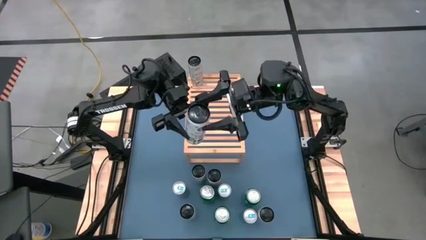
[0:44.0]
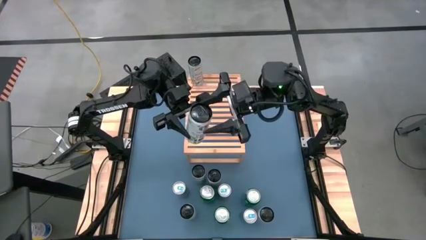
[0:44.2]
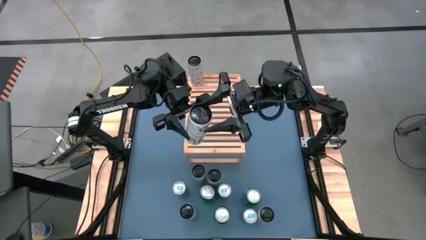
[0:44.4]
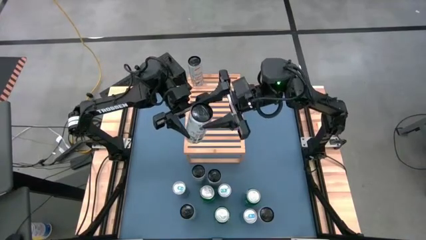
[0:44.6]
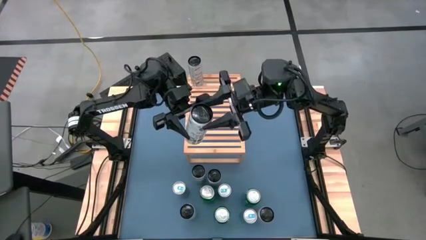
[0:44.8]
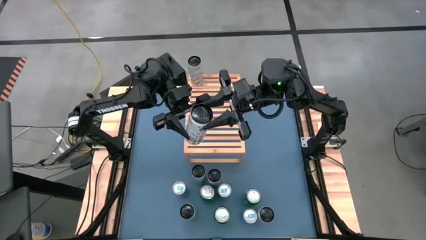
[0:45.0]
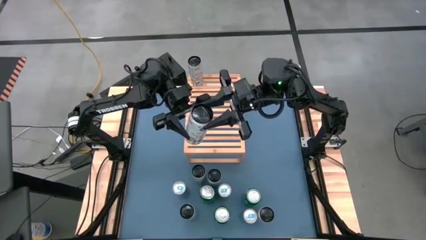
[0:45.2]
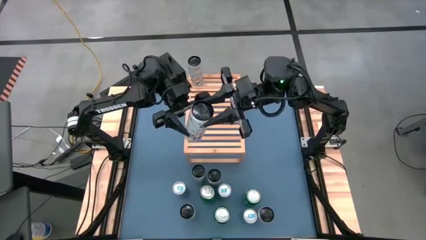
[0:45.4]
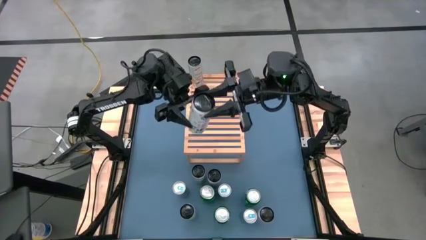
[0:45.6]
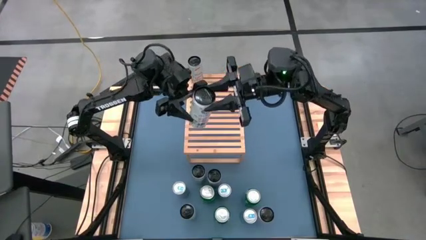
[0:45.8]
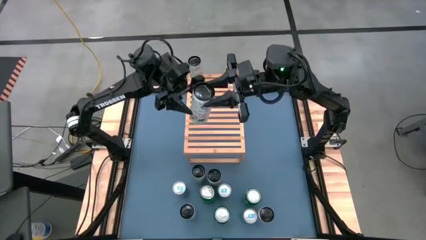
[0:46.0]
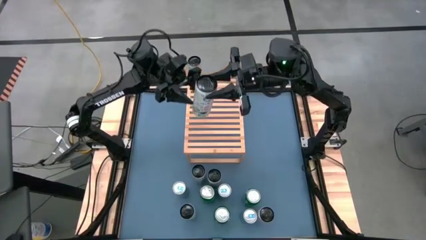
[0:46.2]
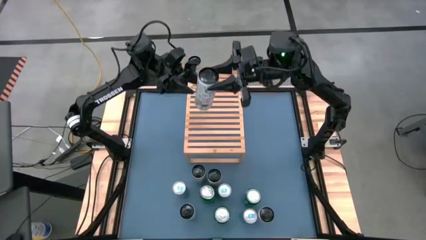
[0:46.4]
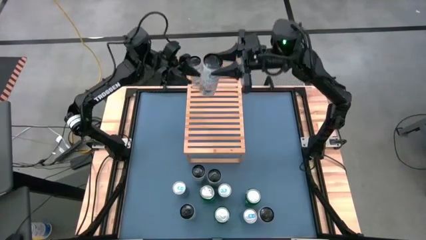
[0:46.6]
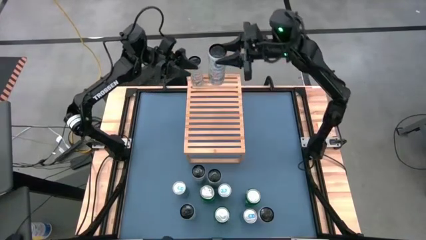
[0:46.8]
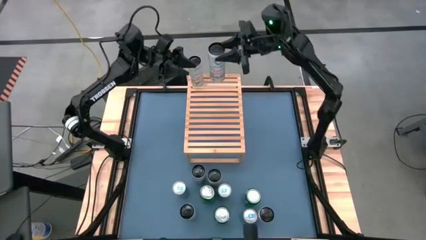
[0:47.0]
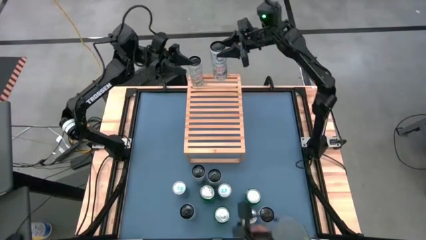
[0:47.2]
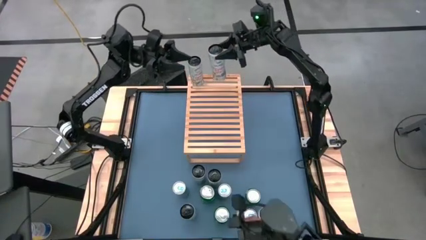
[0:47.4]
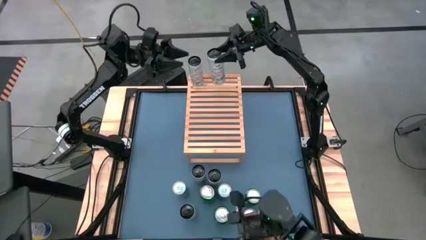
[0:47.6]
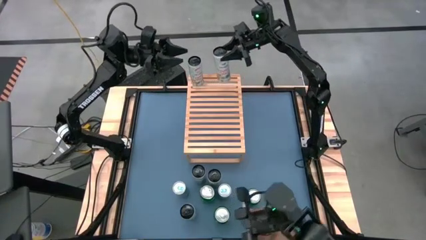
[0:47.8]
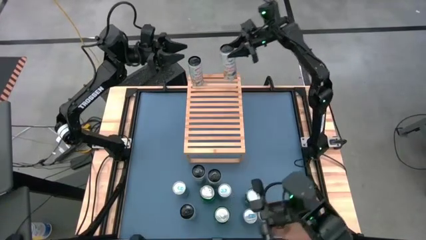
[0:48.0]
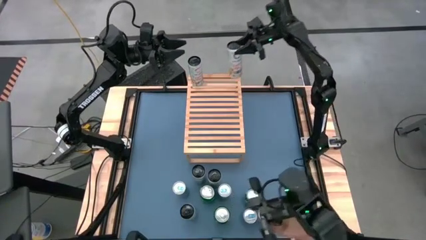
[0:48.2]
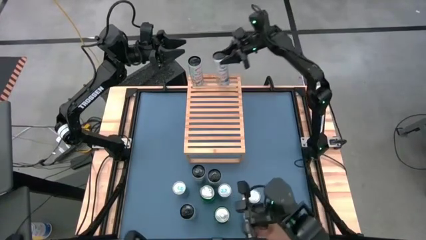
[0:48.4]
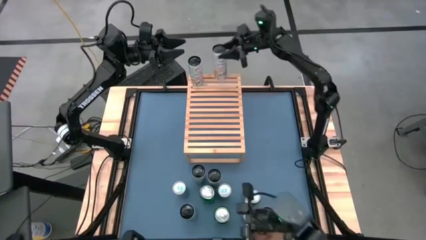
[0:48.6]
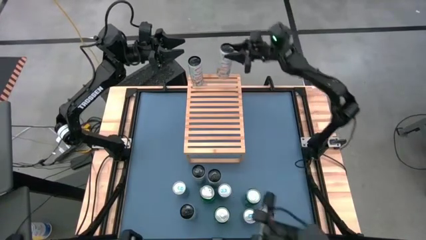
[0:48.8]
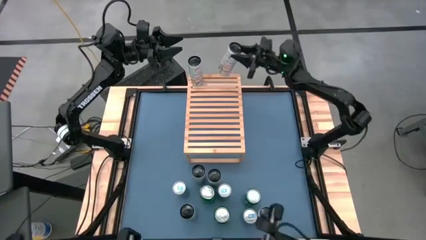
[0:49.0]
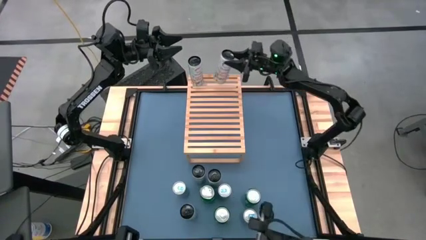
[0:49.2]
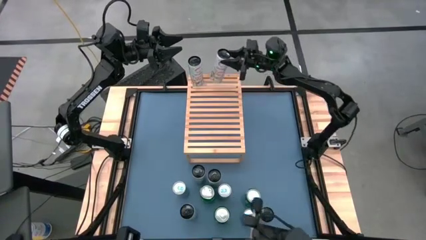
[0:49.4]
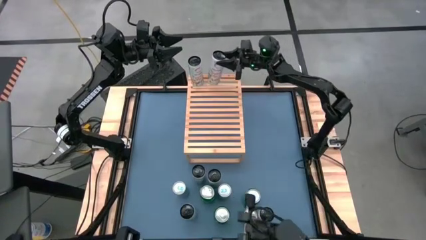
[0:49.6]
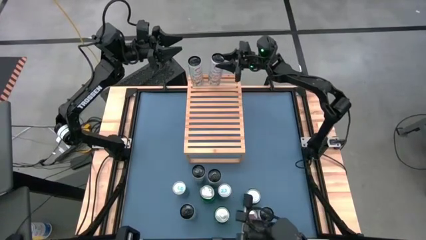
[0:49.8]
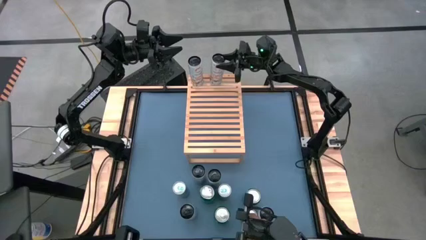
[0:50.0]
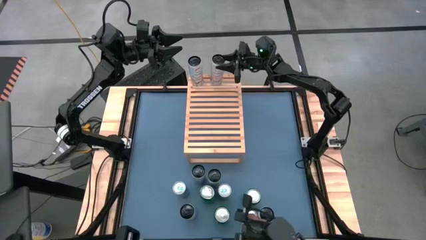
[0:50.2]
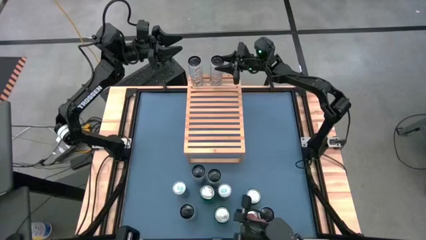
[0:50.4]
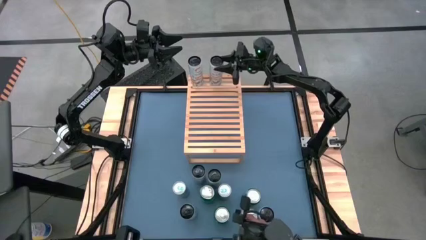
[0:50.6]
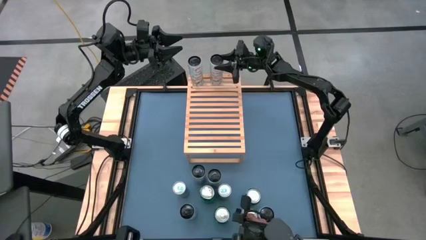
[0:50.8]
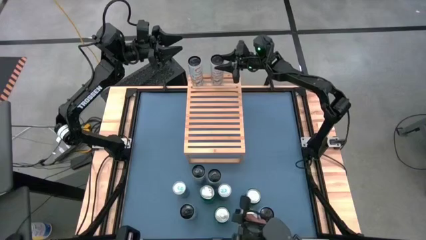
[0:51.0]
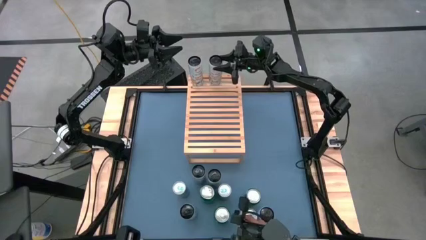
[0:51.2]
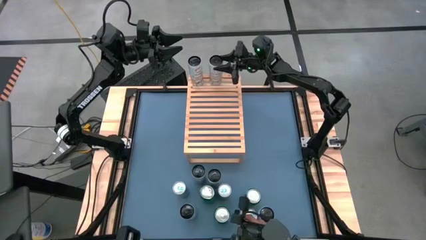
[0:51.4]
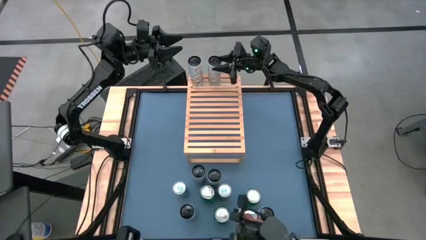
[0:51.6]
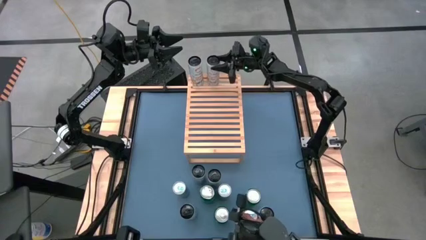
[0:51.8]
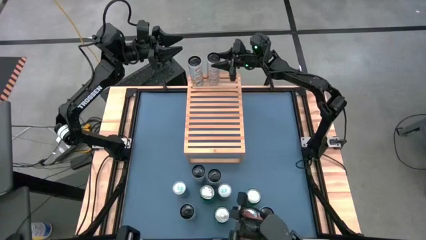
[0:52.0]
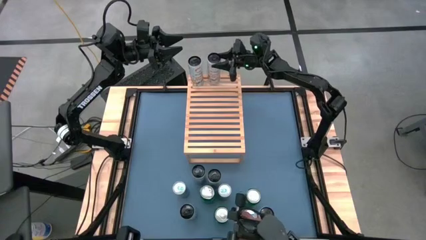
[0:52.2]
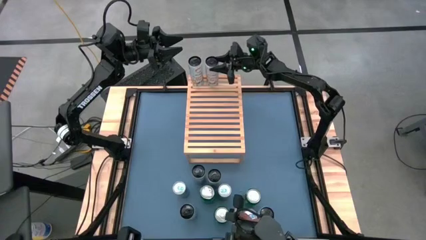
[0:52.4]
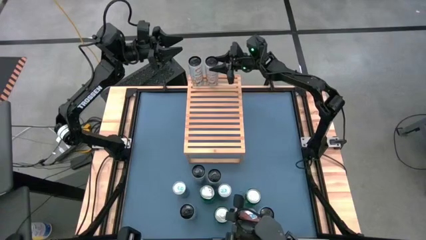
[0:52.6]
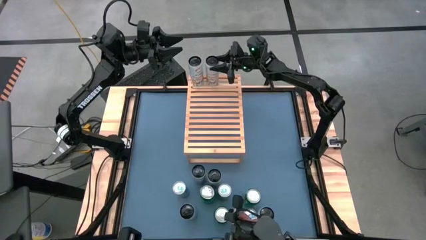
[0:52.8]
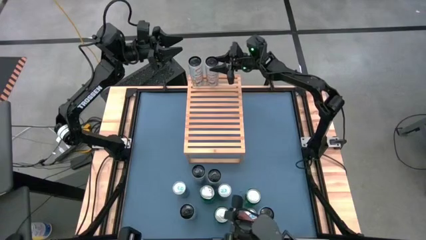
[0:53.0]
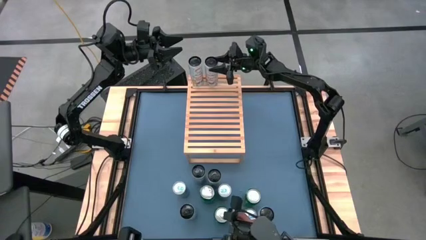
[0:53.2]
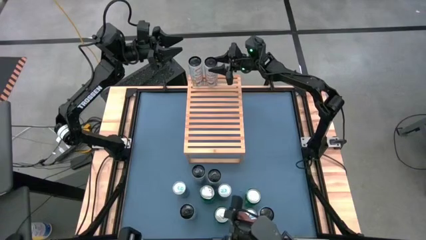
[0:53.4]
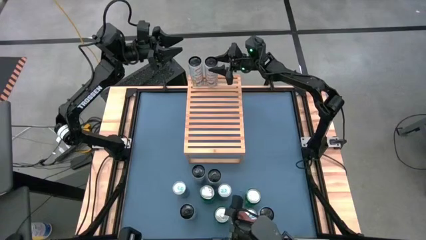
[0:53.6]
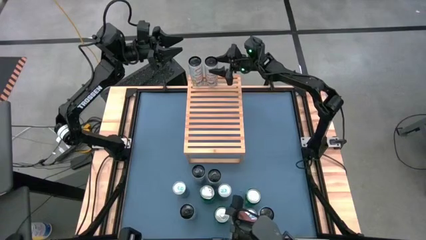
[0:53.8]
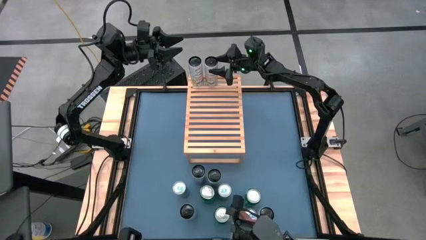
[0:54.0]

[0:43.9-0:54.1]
Task: Place canned beverage on shelf
Put the white yellow soda can on the shelf aligned with the other white yellow soda can
